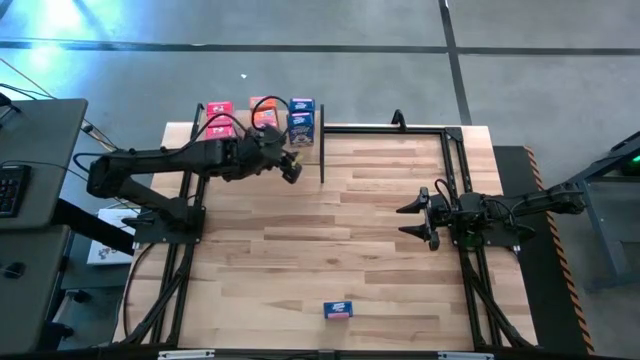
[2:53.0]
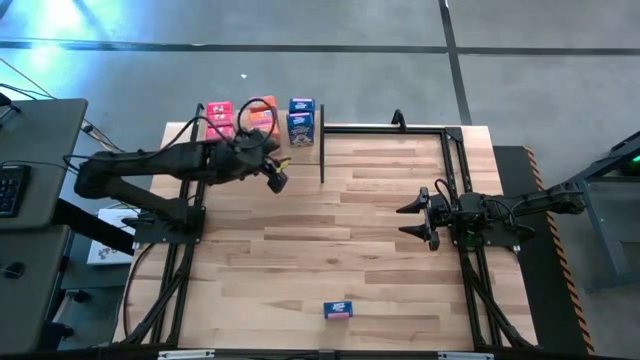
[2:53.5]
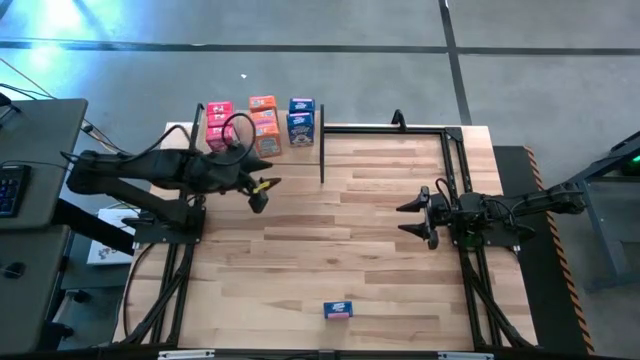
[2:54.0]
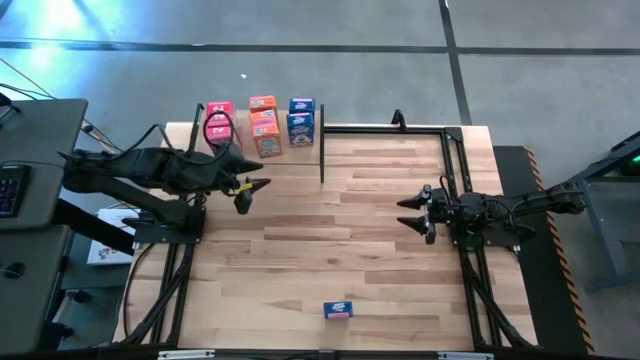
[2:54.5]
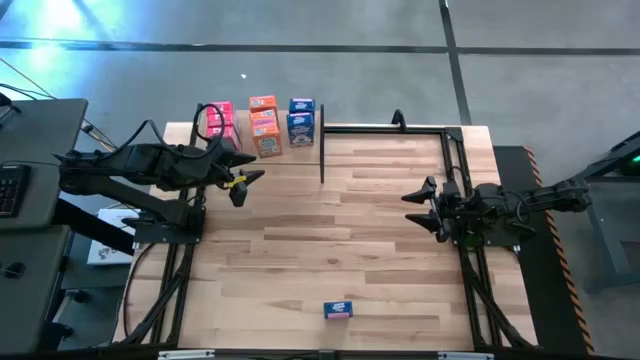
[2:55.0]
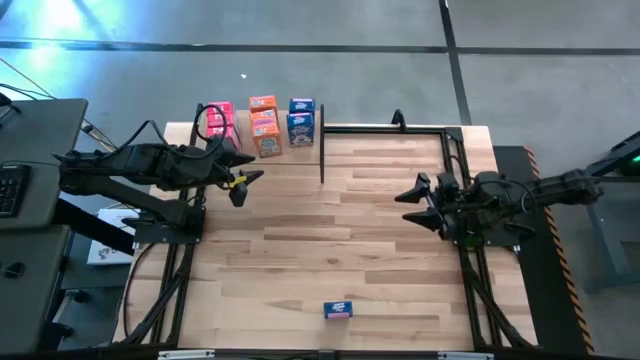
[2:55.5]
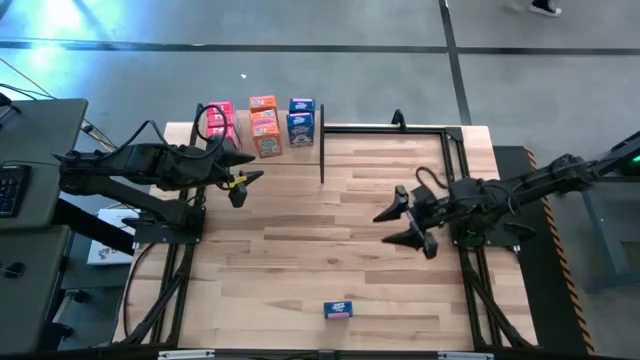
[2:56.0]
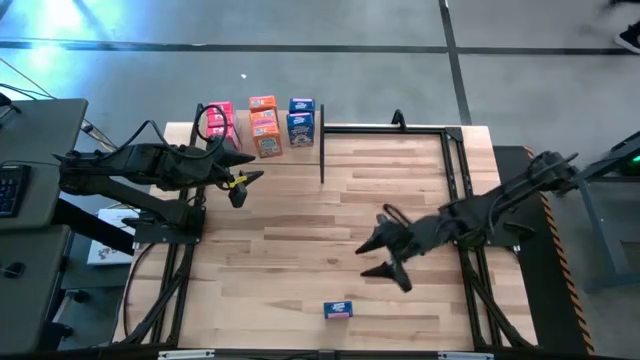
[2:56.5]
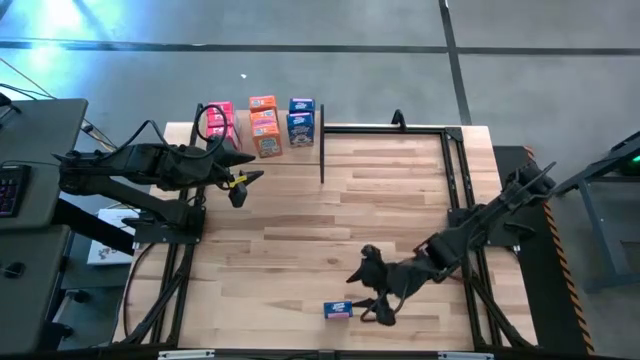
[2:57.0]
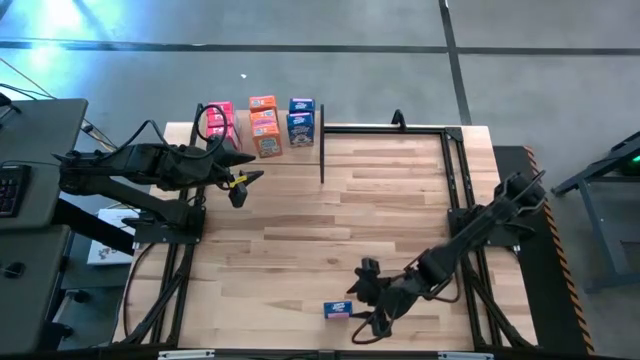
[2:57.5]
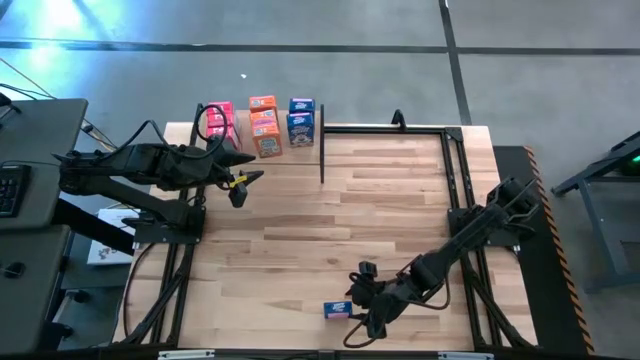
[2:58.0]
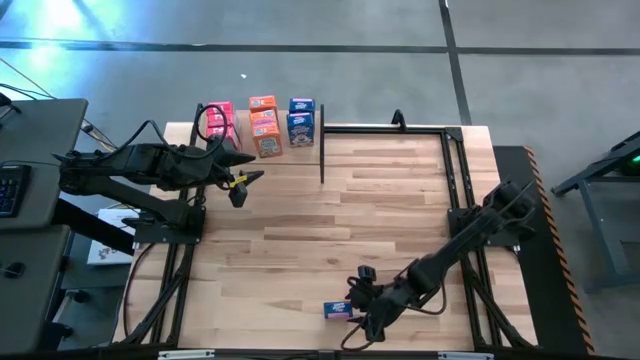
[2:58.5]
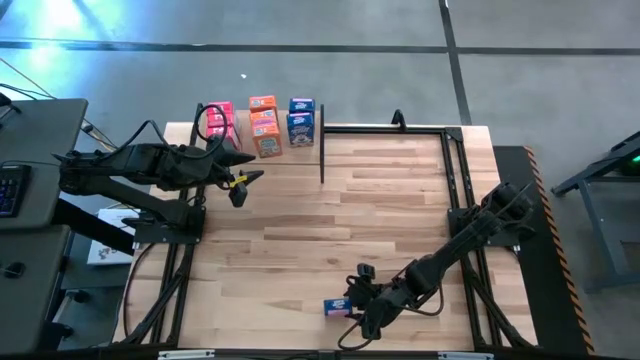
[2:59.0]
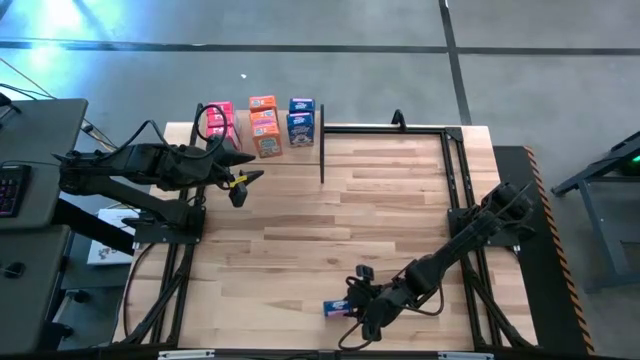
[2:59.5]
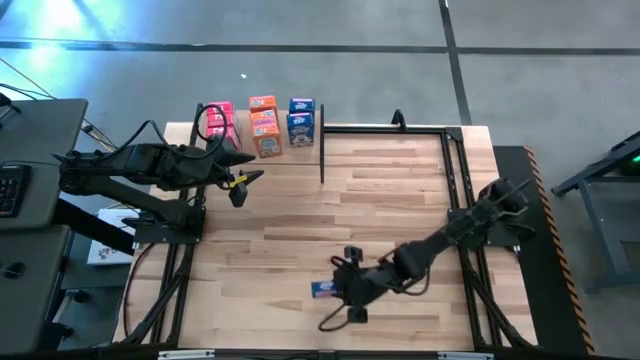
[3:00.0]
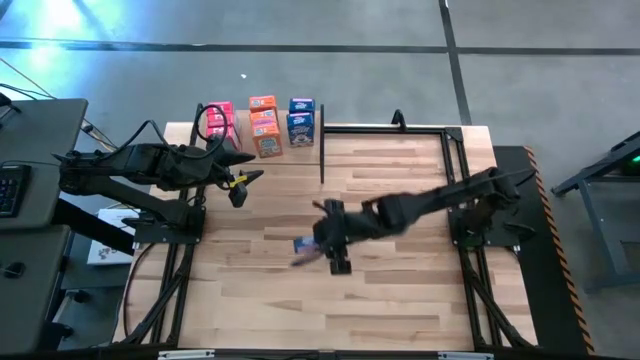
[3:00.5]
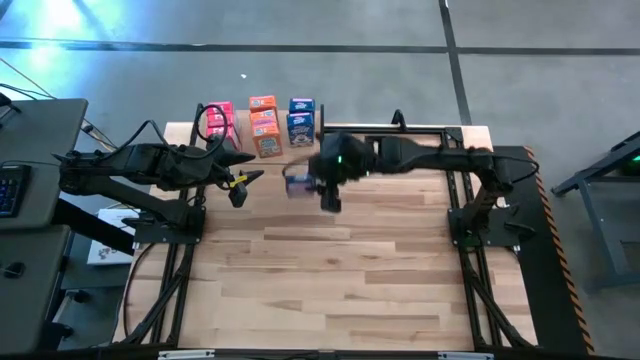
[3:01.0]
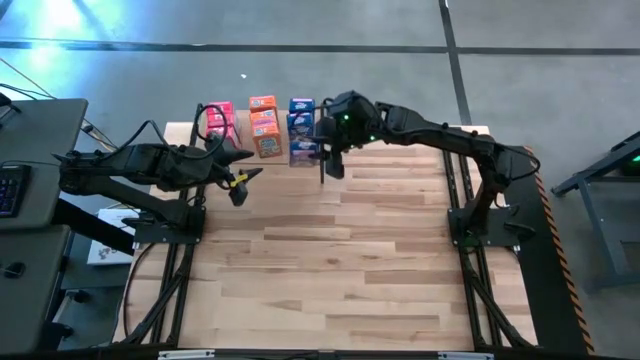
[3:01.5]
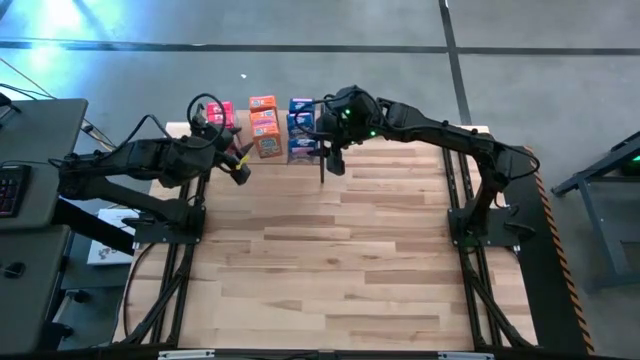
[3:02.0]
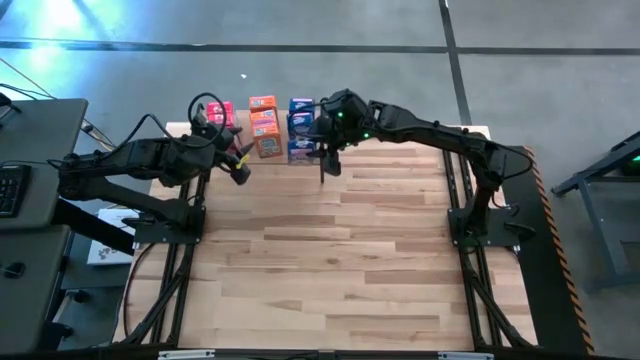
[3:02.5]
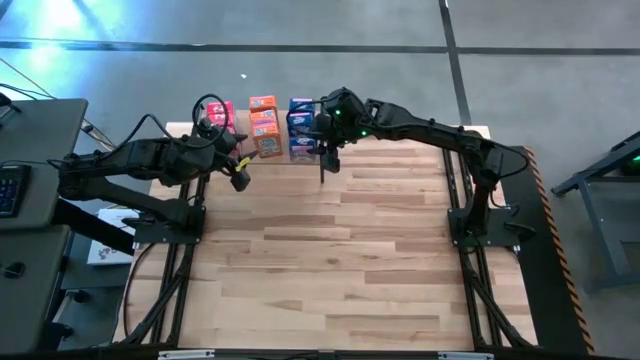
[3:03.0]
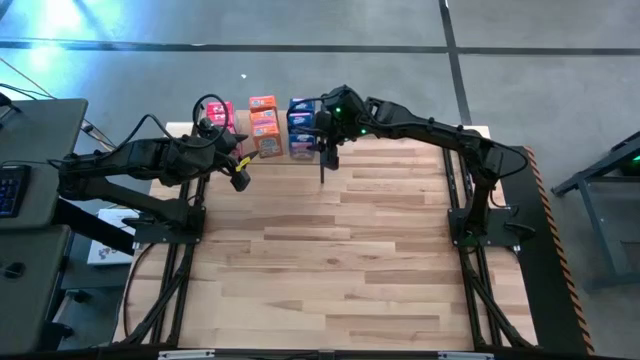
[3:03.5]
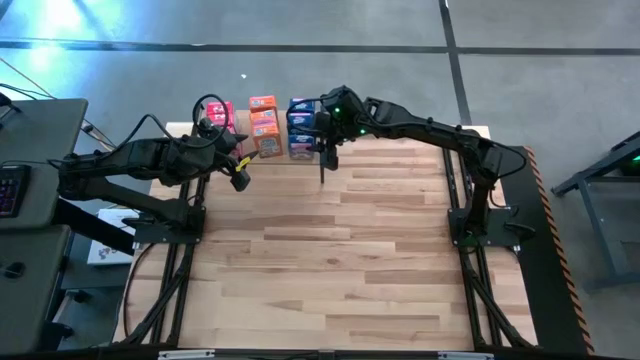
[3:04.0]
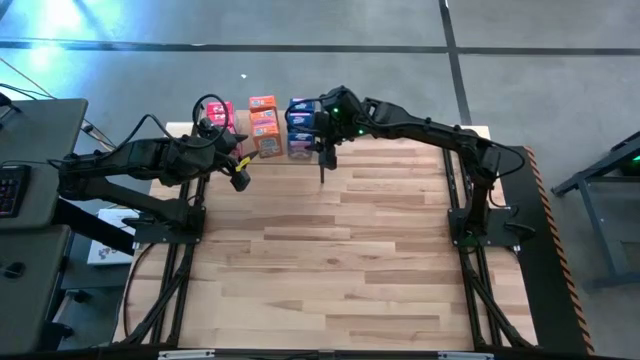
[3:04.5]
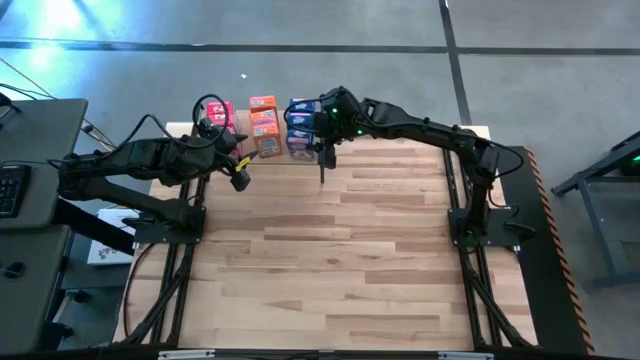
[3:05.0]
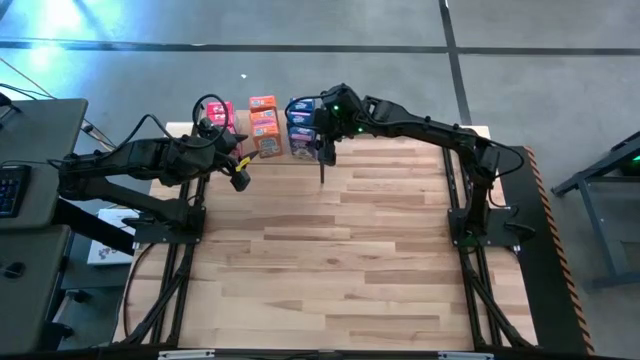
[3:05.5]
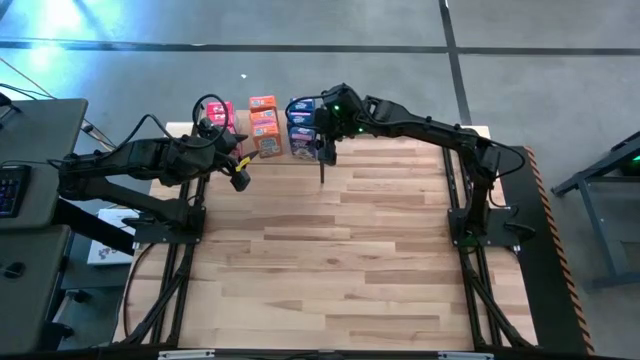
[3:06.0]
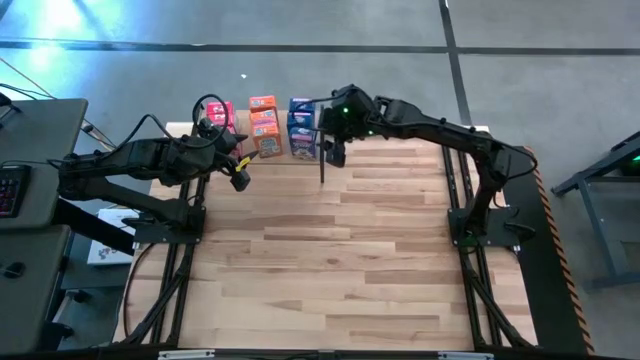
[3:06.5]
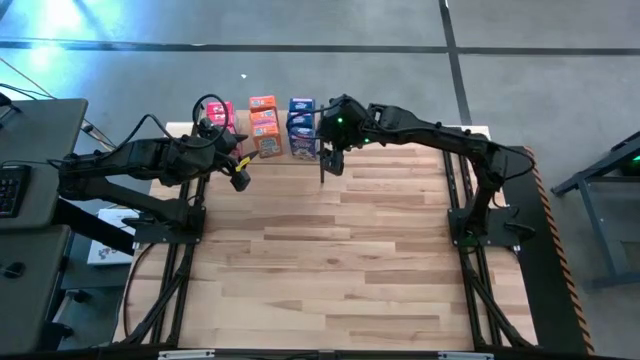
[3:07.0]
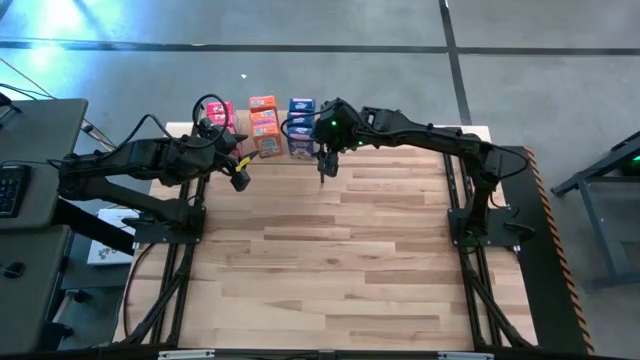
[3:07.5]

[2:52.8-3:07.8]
Task: Stack cereal on shelf
Put the blue cereal box on the the shelf aligned with the other blue cereal boxes

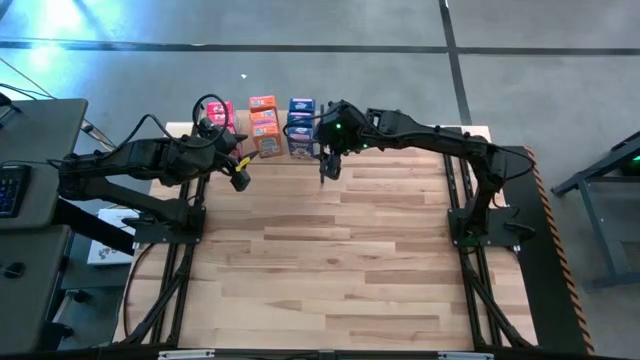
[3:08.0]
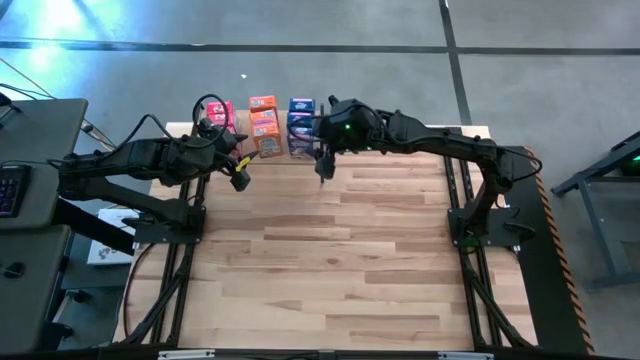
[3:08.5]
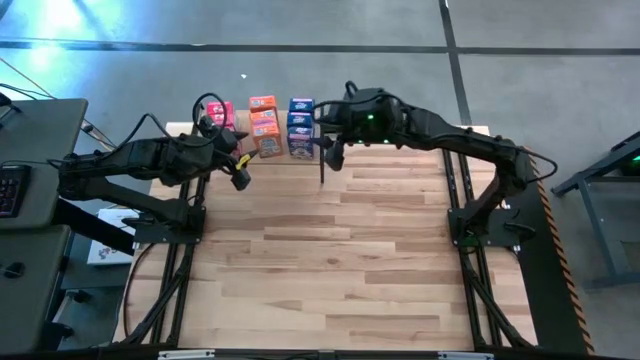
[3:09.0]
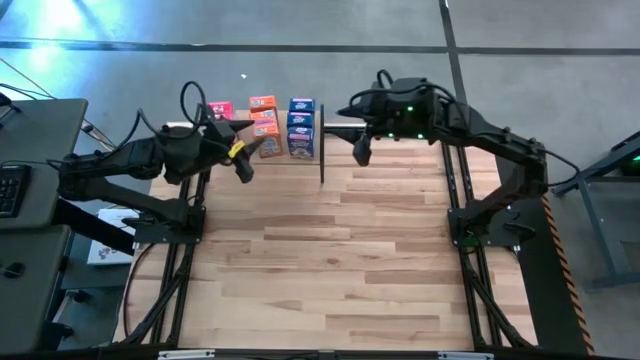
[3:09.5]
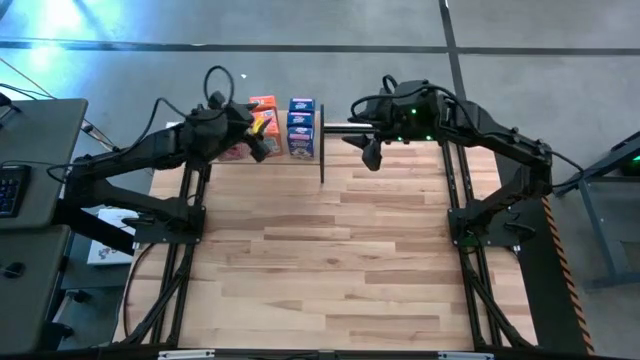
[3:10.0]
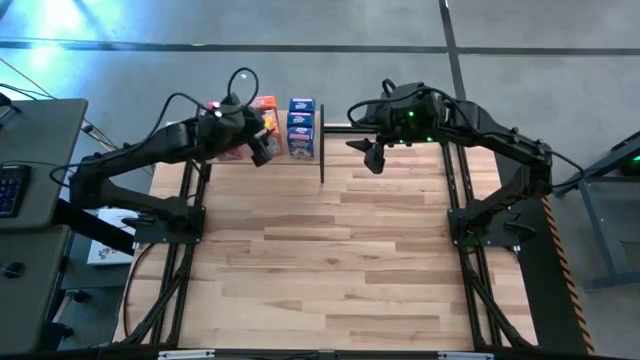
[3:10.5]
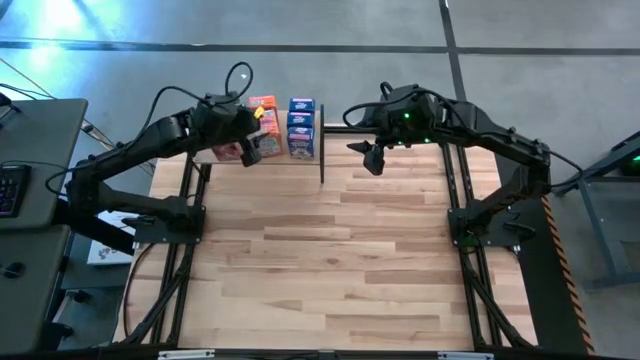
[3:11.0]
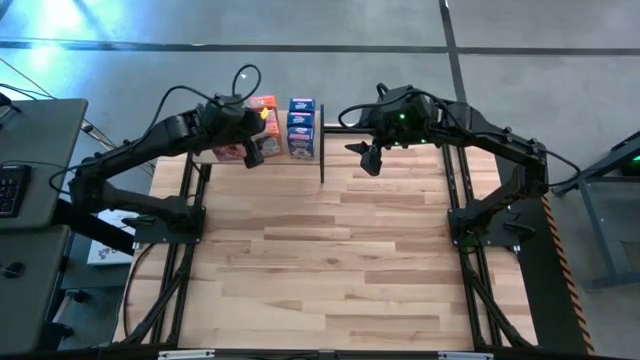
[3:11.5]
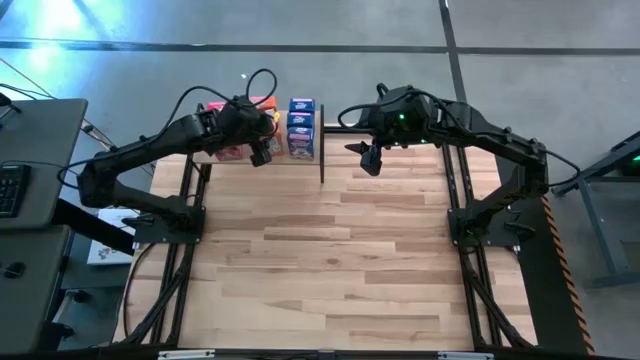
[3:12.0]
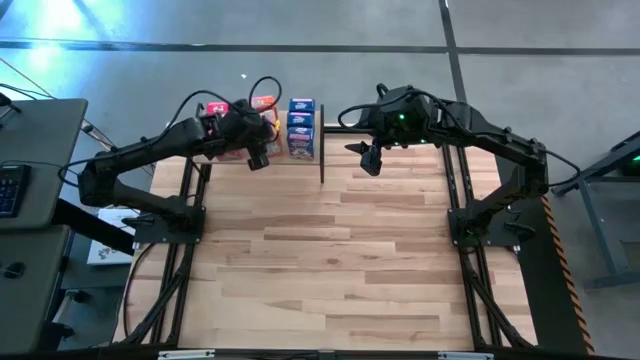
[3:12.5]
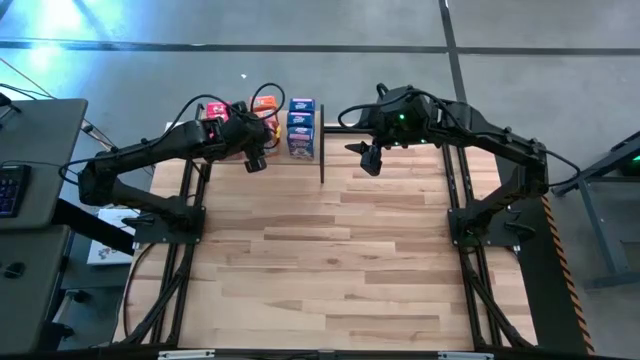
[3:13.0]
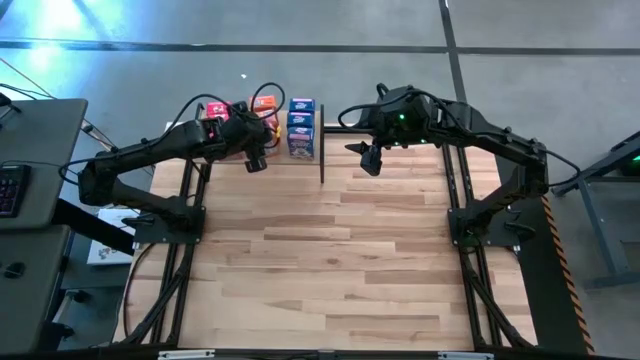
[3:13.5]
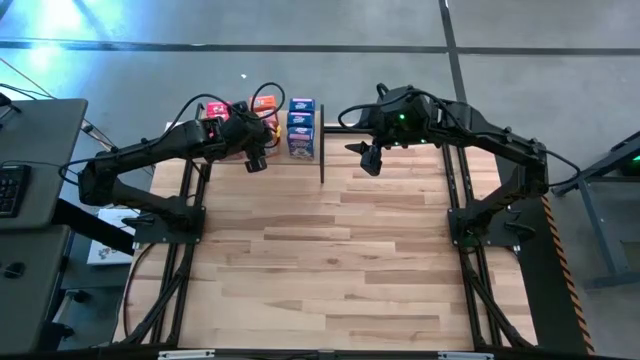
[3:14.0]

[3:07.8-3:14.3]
Adjust the orange cereal box on the shelf

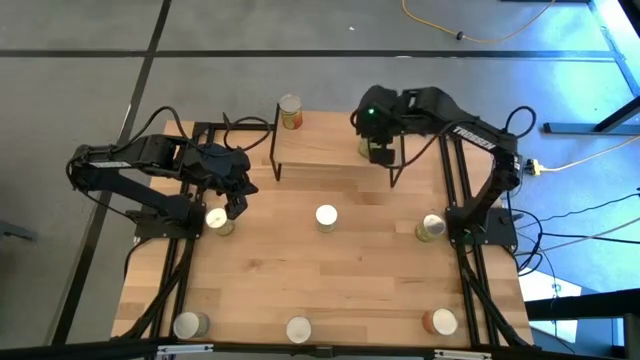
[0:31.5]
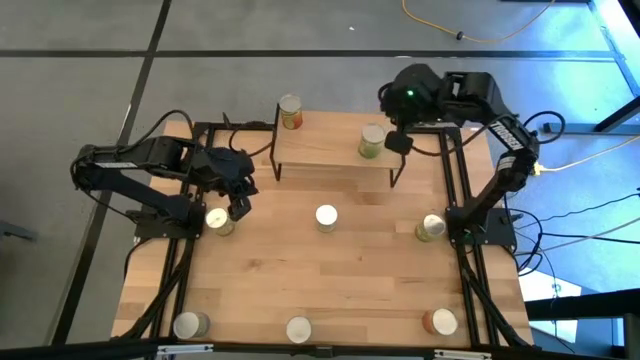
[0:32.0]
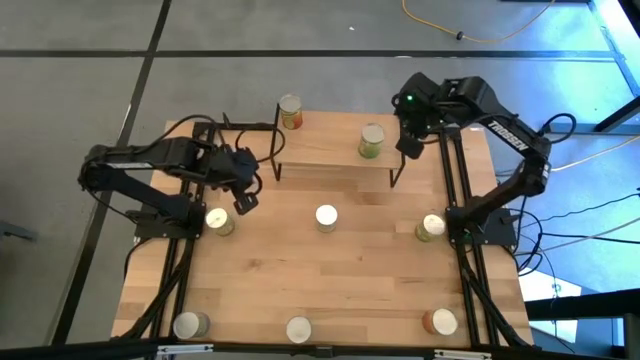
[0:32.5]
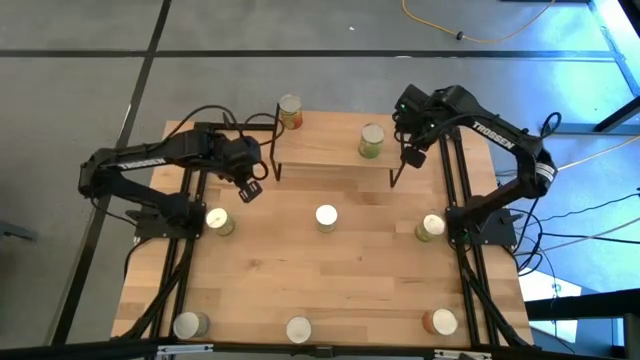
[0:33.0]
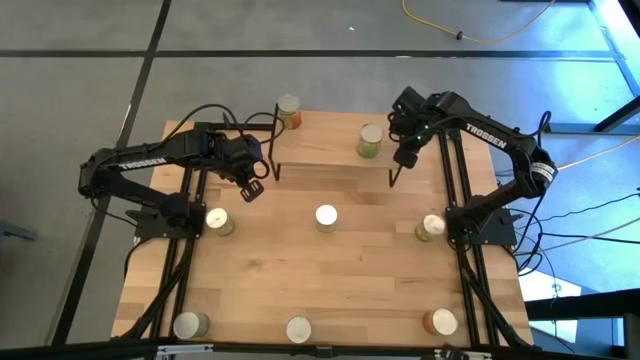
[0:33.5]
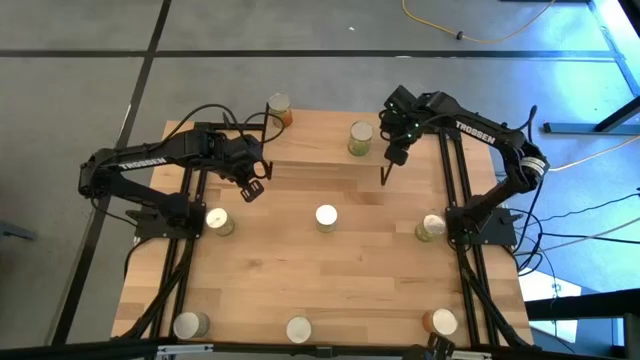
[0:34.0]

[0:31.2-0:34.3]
Task: Pick and place cans onto a shelf
Adjust the shelf on the table
